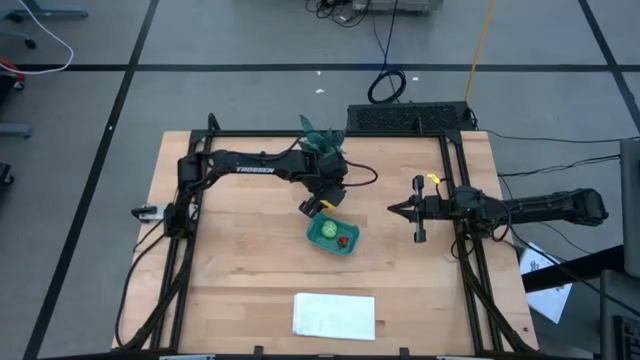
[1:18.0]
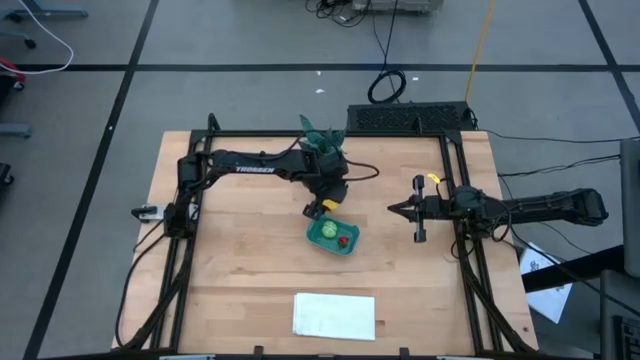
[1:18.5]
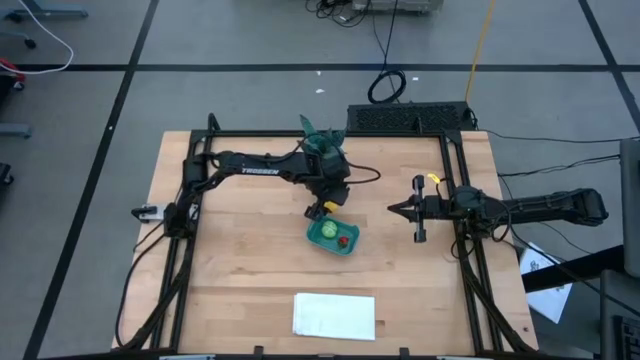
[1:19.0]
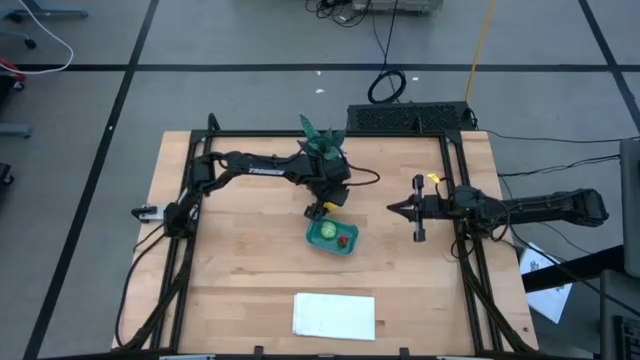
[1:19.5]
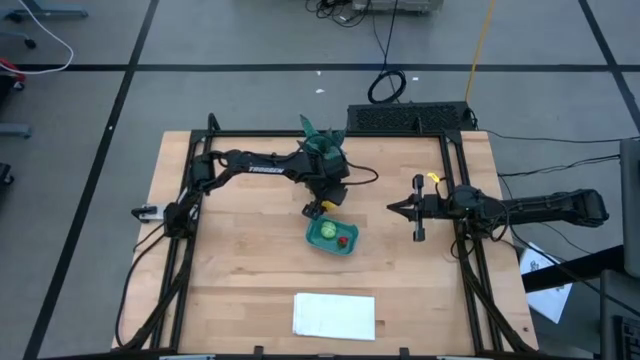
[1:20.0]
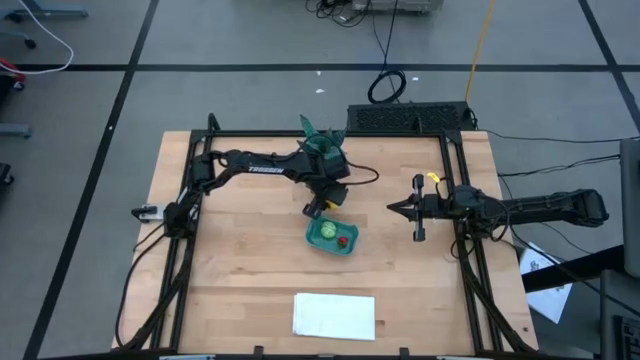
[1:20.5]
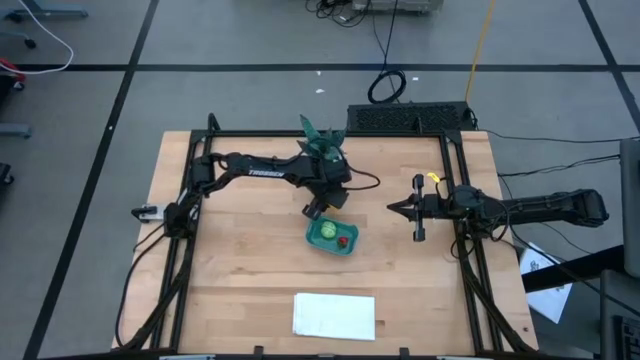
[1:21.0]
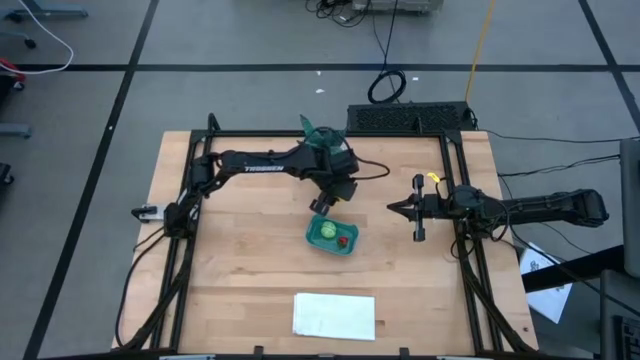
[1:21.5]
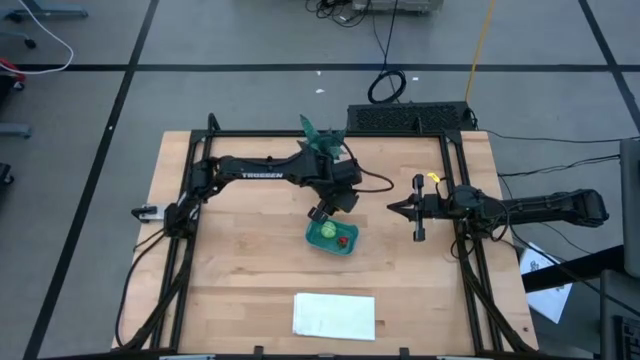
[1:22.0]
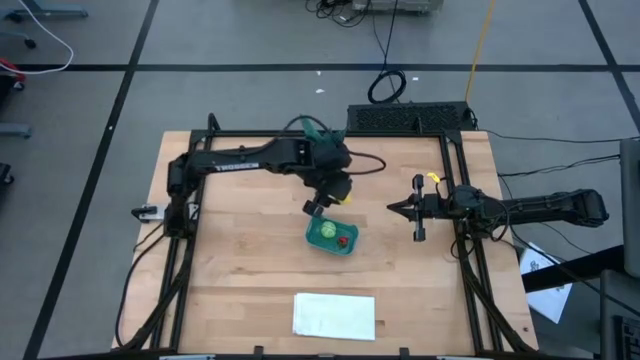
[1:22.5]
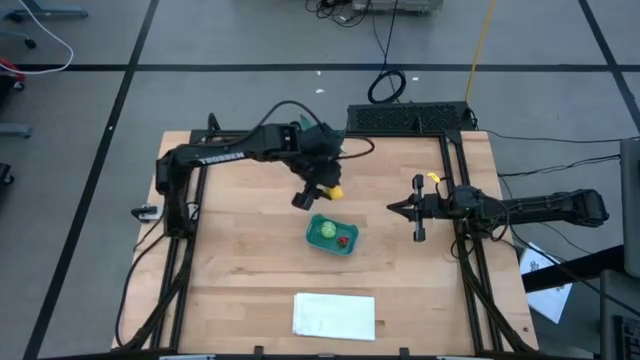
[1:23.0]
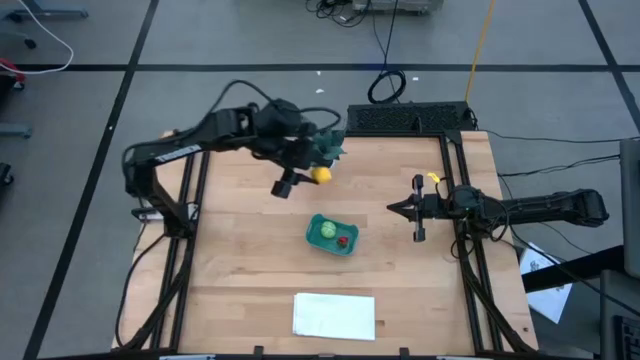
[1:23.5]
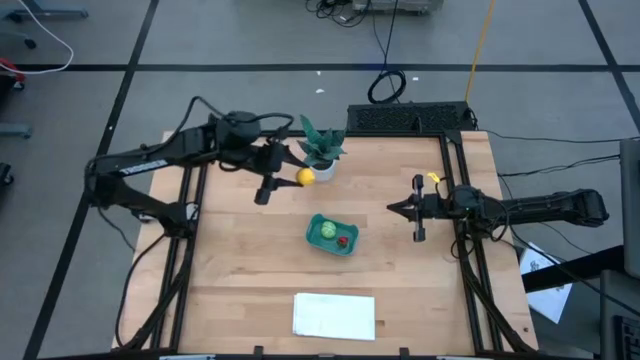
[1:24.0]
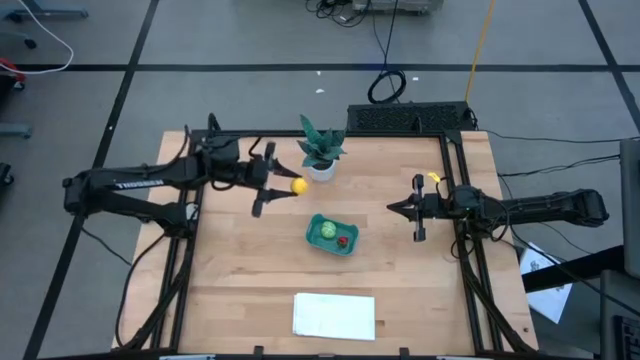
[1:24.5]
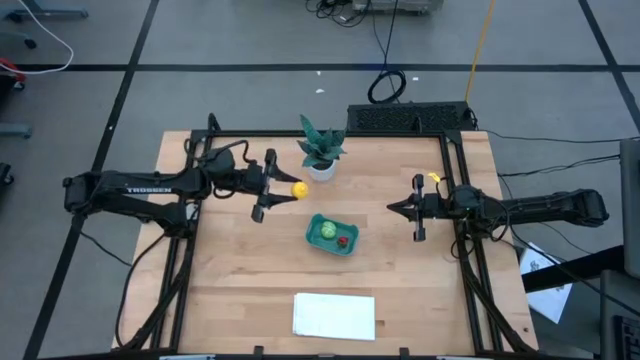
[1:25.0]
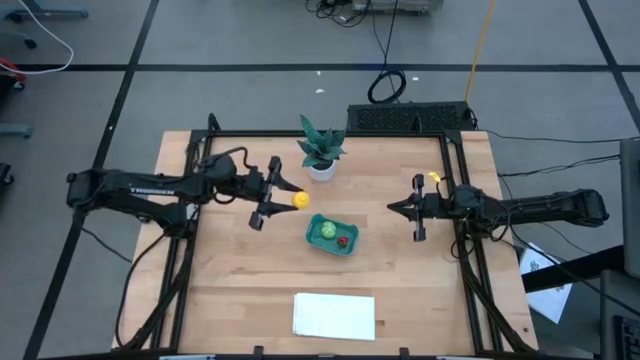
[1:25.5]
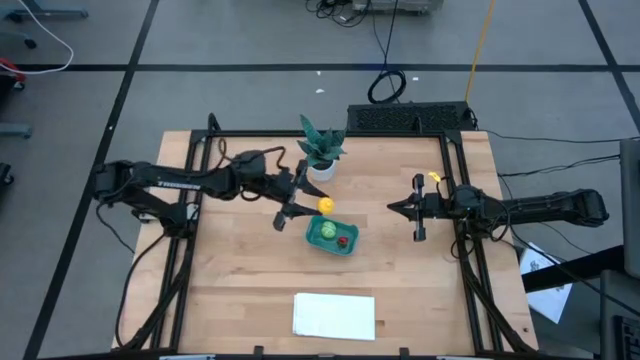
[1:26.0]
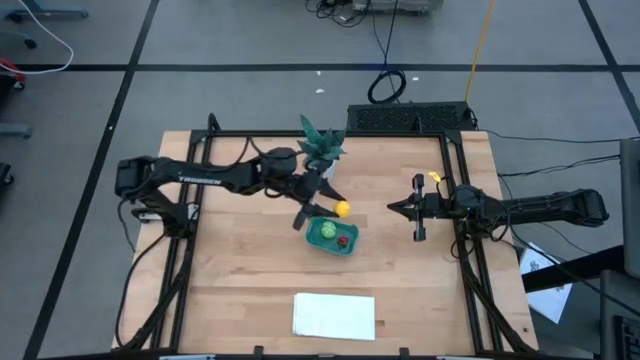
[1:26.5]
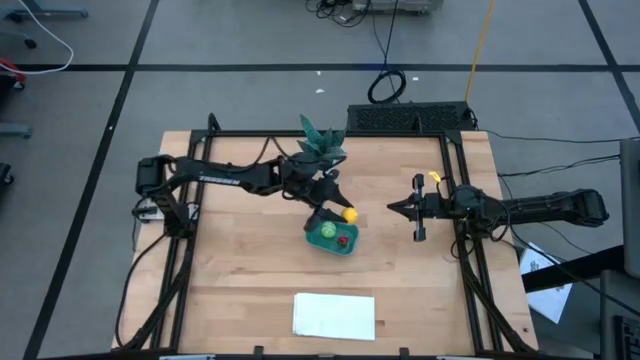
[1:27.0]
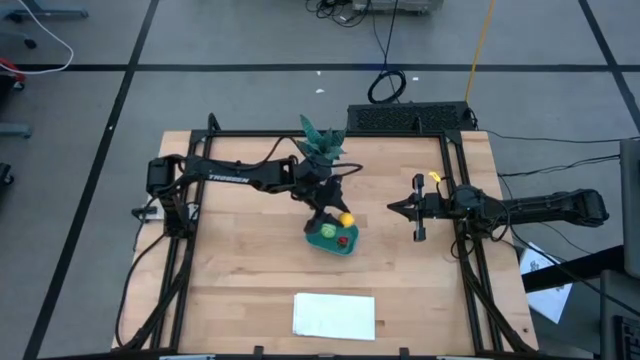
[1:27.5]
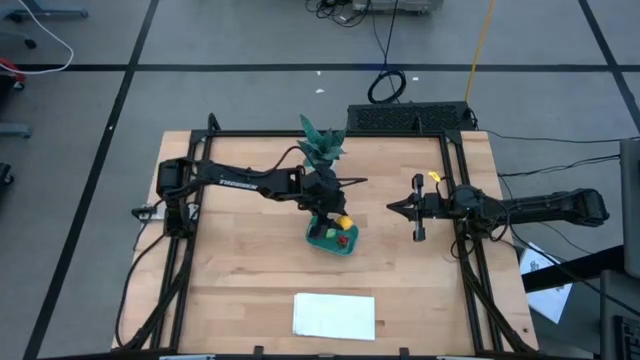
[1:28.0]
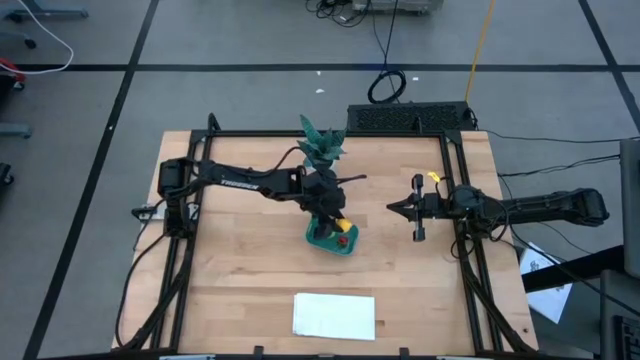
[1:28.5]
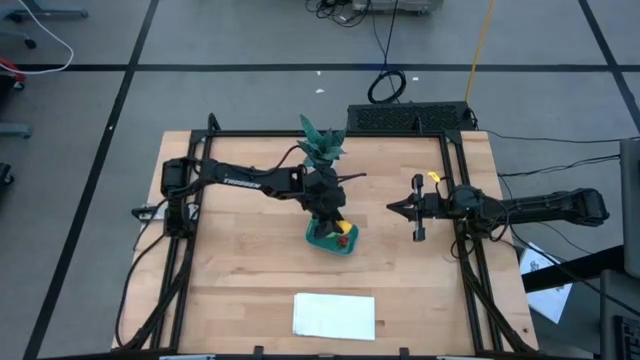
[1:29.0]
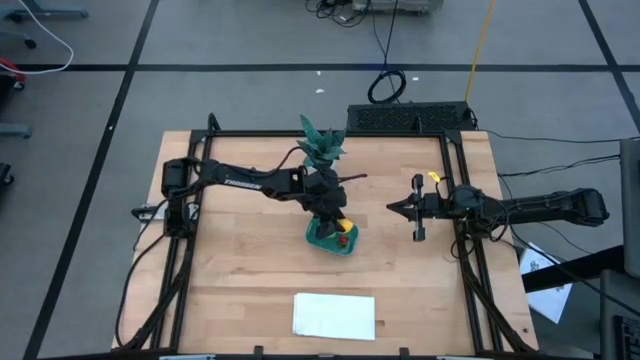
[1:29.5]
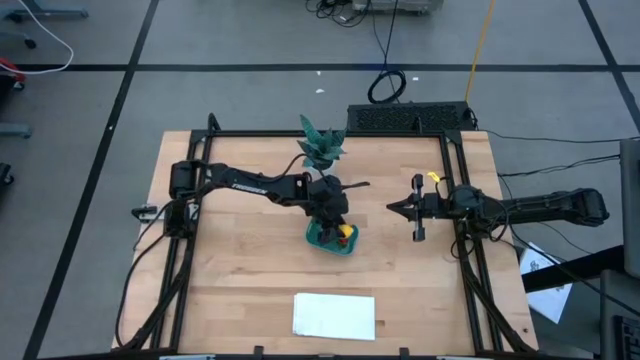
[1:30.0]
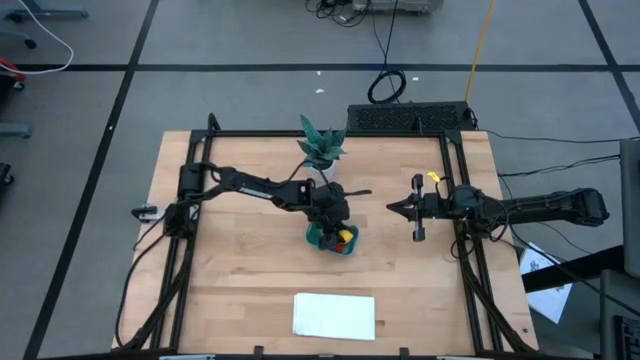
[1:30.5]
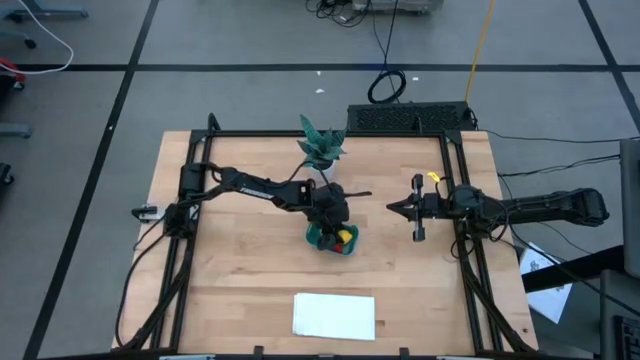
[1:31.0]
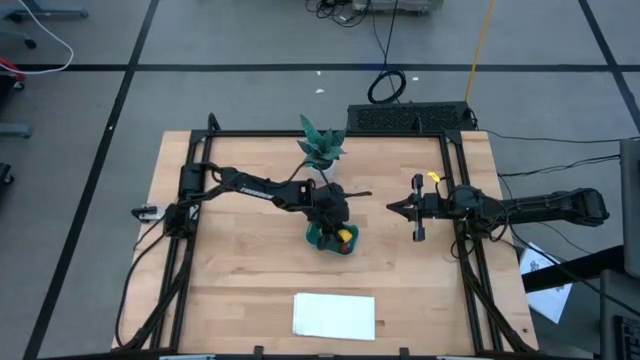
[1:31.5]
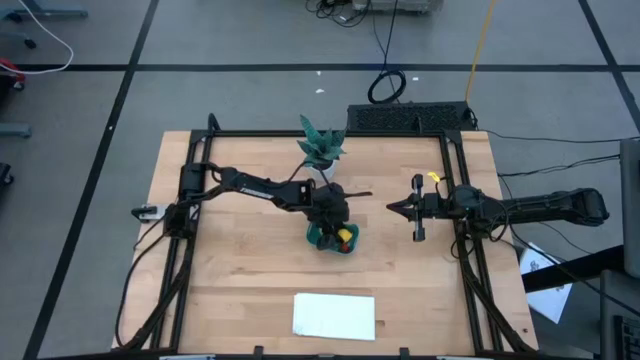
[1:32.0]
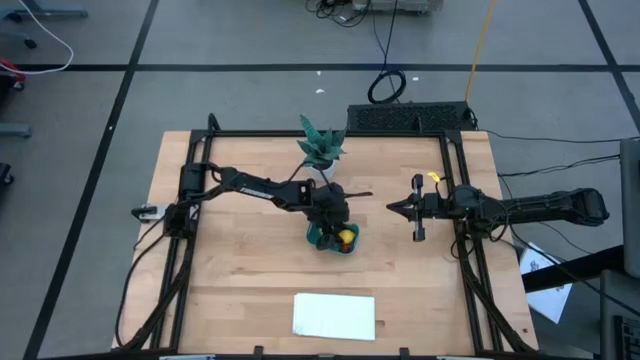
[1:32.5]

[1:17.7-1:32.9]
Task: Pick and placing Produce into tupperware
Put the yellow lemon into the green bin
